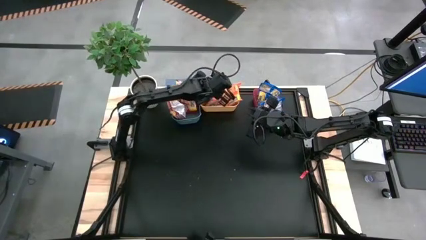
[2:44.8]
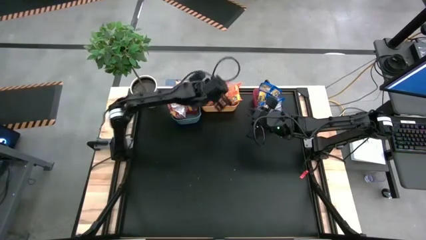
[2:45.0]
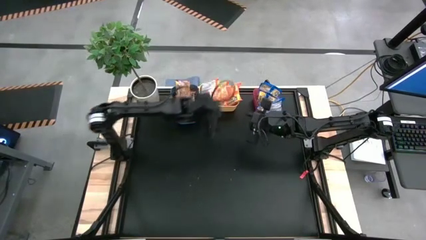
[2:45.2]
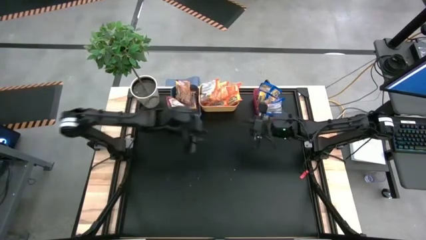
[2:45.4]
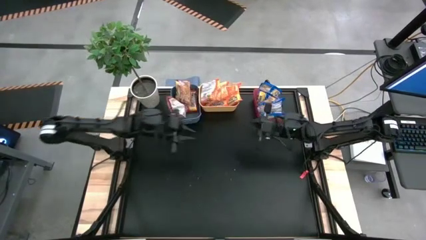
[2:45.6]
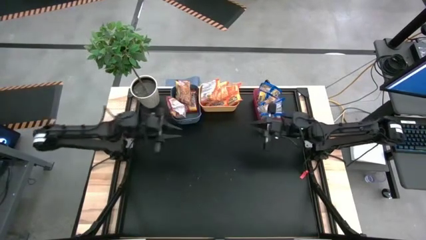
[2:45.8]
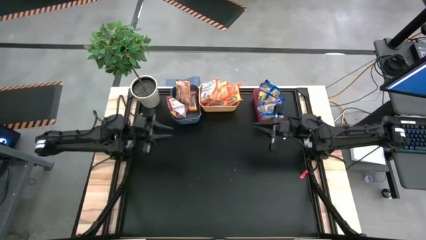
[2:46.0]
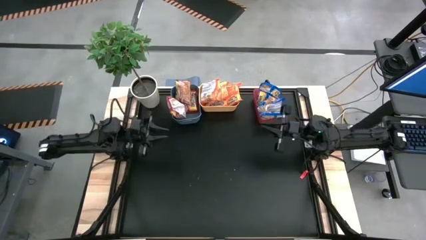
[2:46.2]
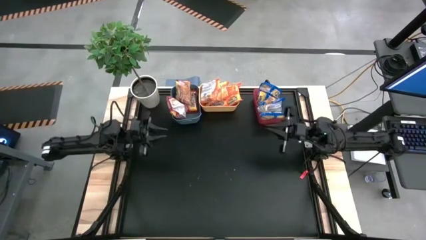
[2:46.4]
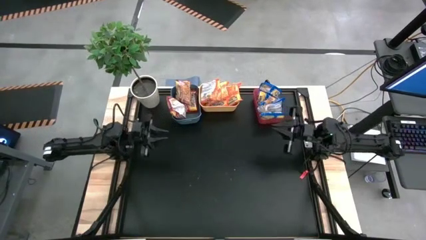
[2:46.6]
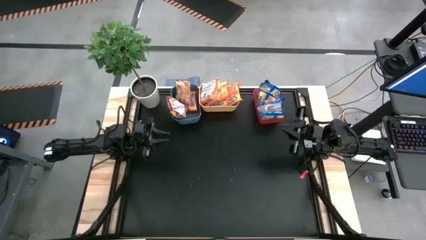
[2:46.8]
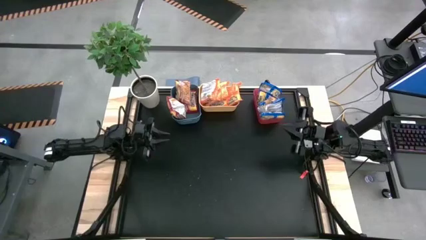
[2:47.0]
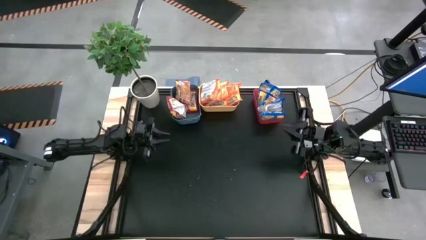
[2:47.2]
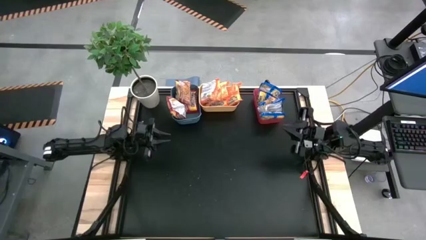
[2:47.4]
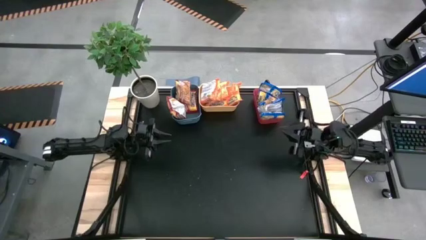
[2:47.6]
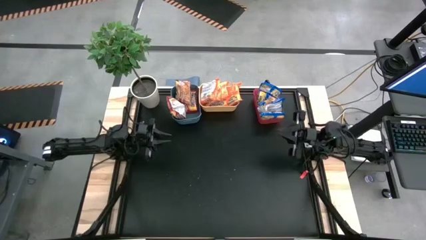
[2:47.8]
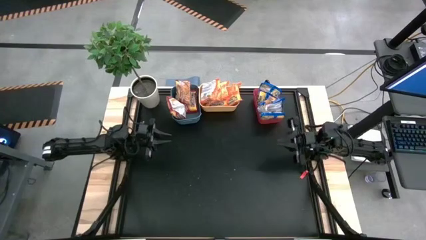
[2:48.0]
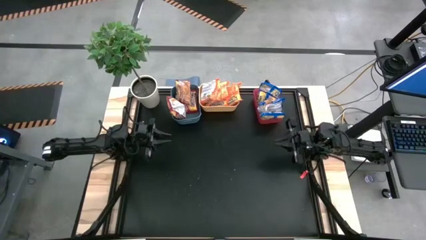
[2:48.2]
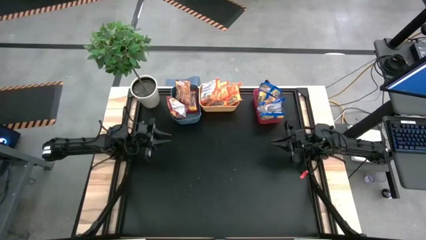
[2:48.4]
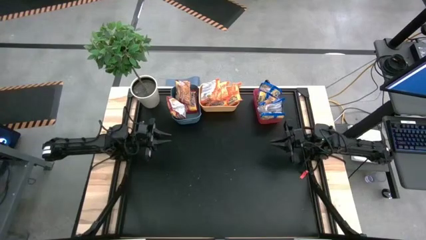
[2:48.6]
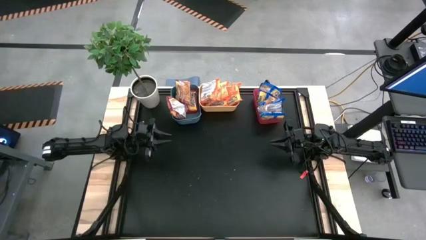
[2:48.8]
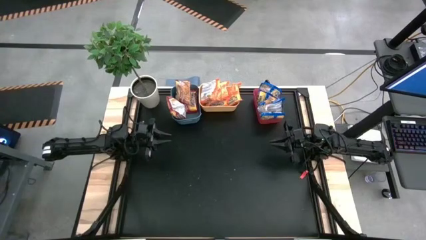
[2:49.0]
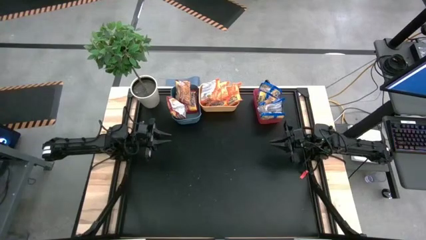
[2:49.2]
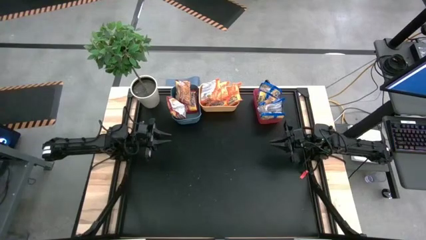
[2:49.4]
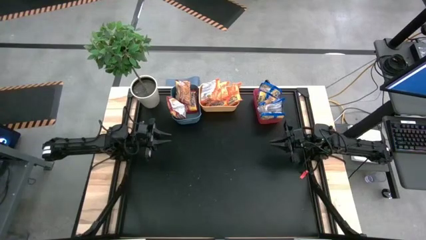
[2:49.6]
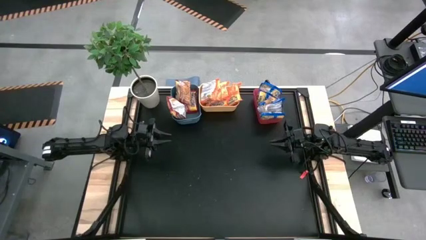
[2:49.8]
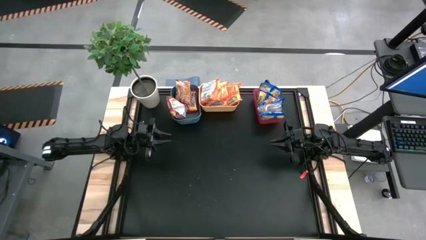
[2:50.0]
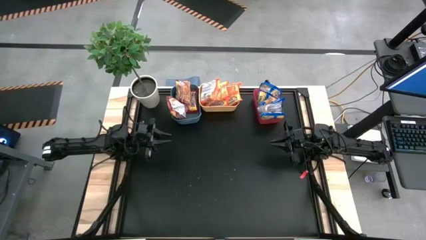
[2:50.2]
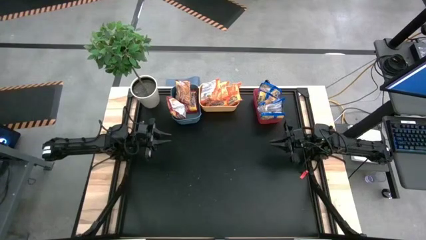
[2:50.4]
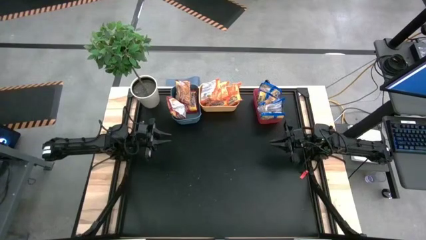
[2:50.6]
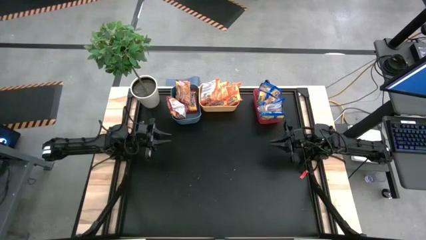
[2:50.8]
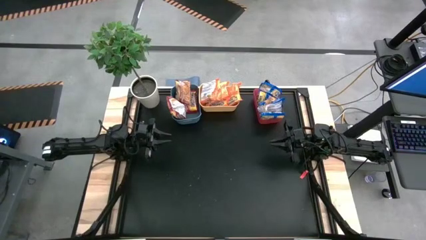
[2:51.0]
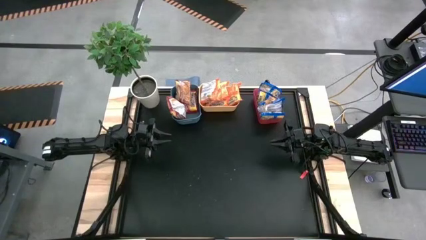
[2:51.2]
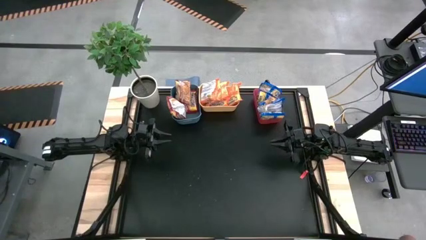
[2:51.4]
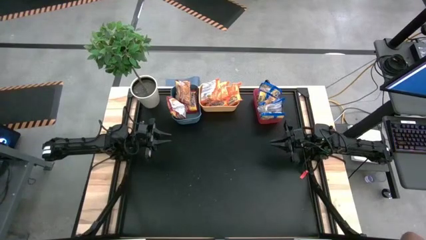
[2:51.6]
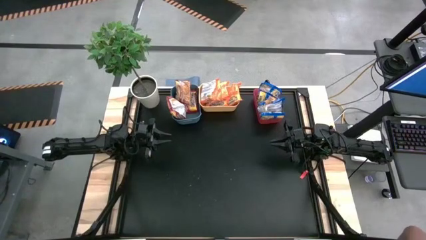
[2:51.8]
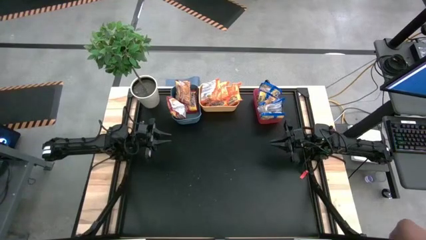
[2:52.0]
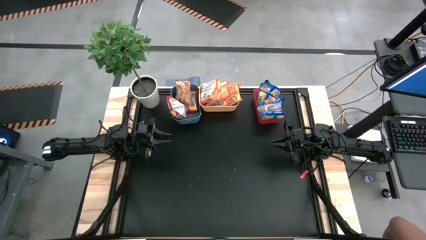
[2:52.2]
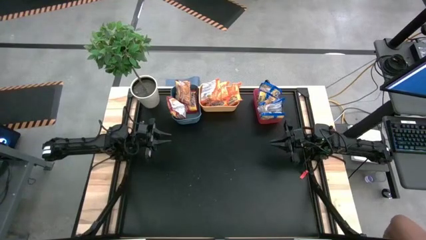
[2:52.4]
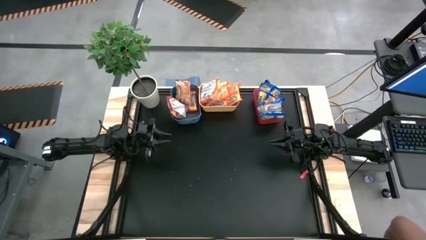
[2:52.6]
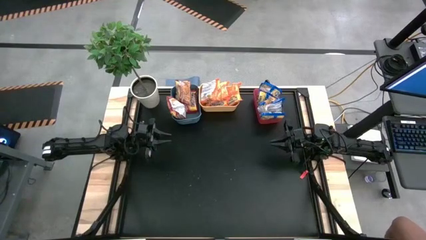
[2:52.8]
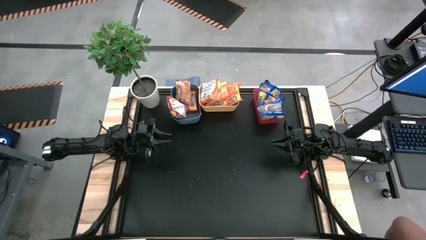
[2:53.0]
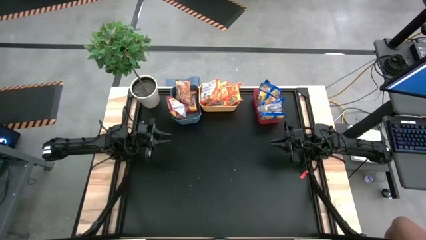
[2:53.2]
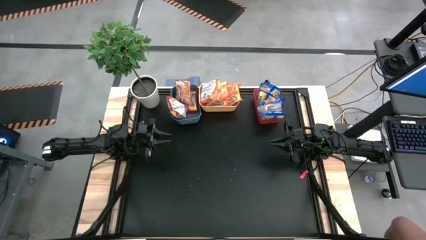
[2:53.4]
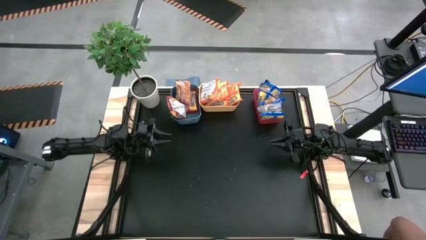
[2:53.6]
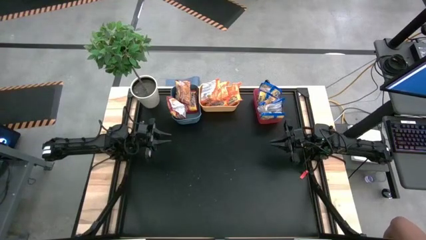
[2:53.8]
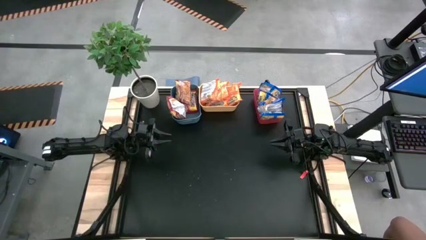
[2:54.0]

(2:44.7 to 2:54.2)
Task: Sort Maruchan noodles
Return to Home Position

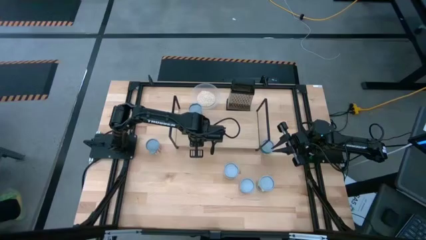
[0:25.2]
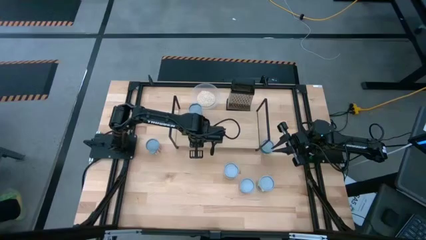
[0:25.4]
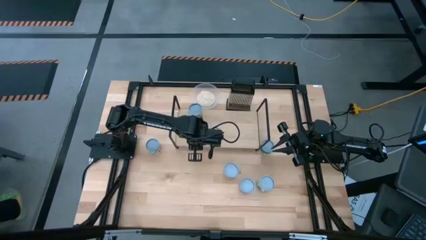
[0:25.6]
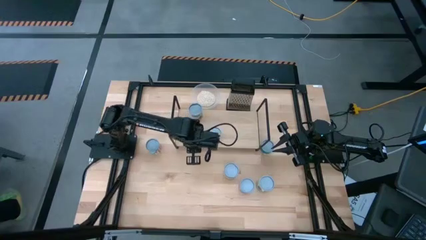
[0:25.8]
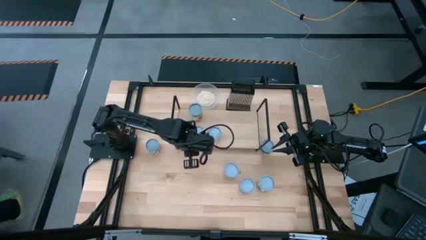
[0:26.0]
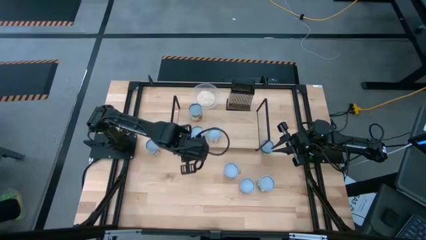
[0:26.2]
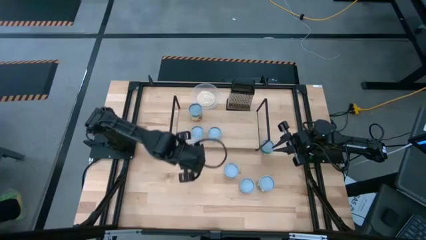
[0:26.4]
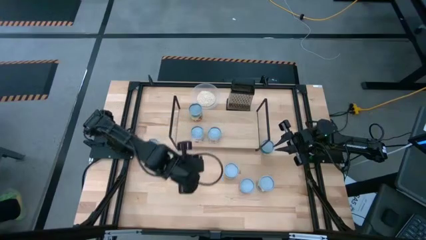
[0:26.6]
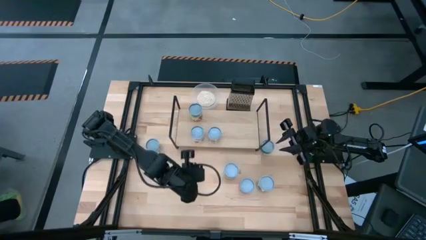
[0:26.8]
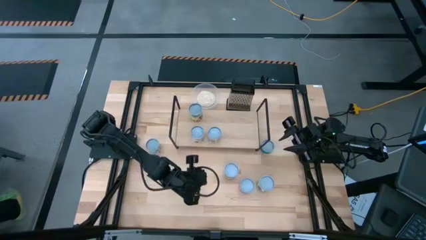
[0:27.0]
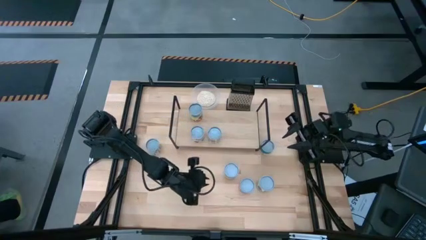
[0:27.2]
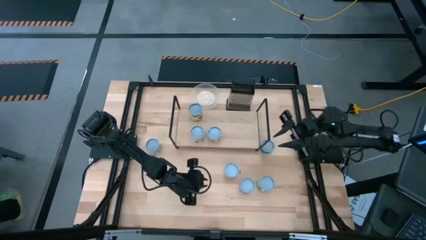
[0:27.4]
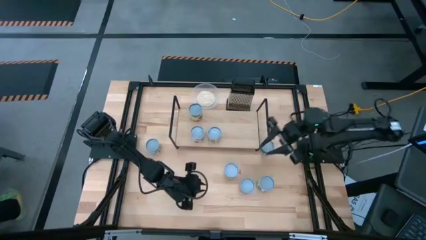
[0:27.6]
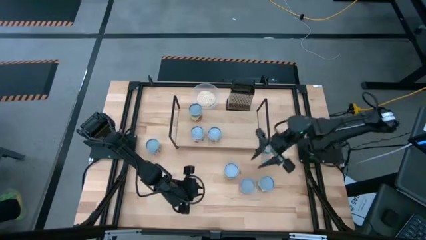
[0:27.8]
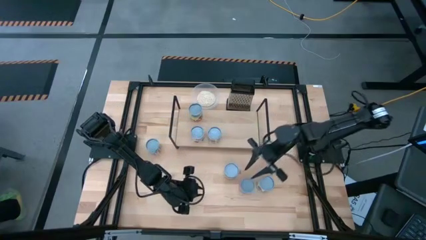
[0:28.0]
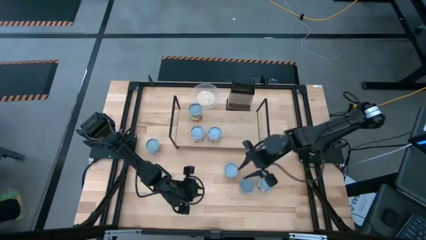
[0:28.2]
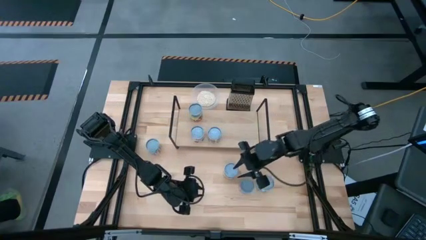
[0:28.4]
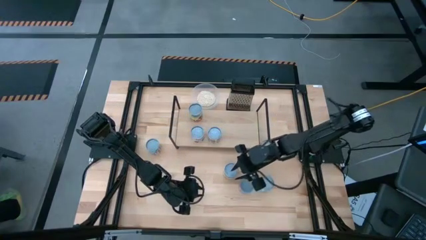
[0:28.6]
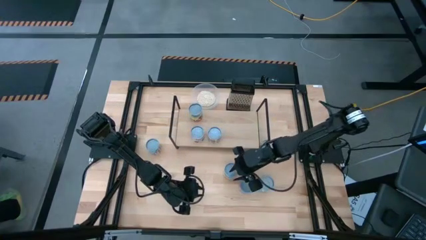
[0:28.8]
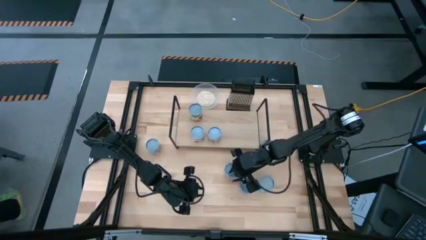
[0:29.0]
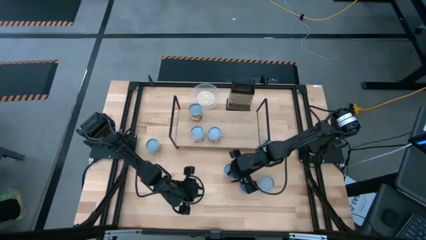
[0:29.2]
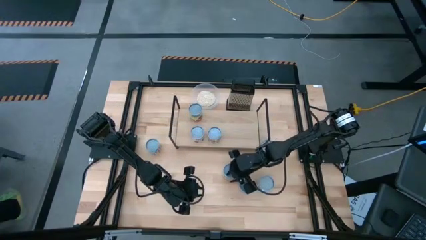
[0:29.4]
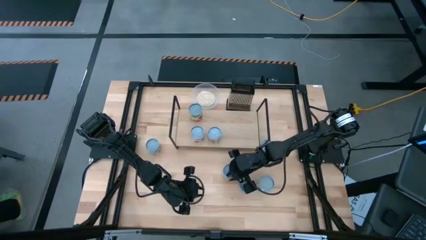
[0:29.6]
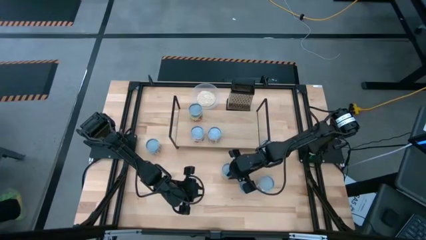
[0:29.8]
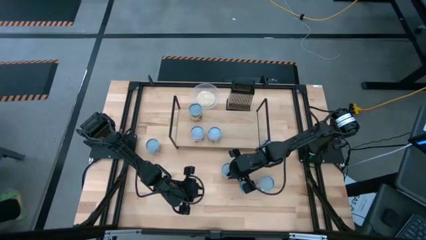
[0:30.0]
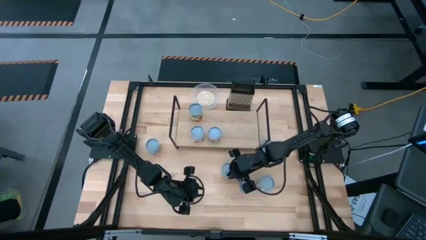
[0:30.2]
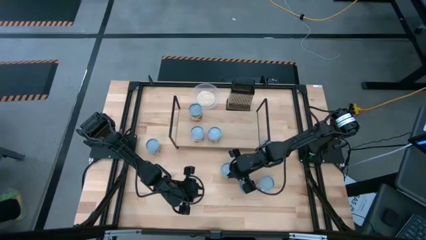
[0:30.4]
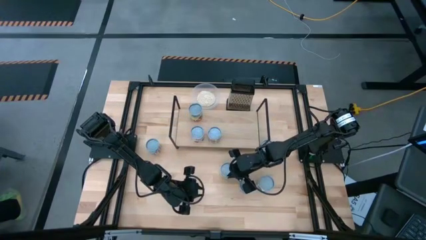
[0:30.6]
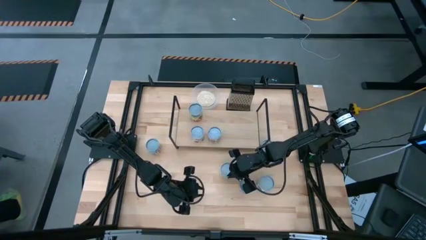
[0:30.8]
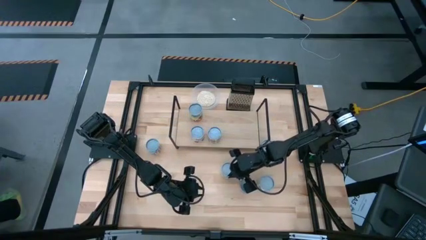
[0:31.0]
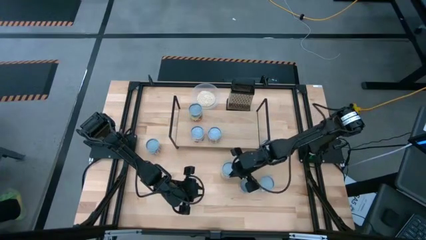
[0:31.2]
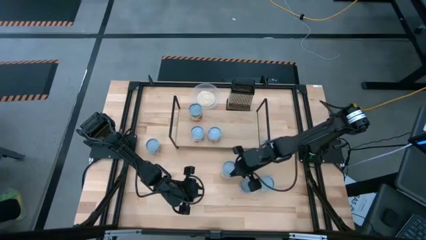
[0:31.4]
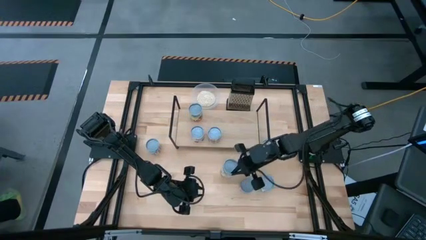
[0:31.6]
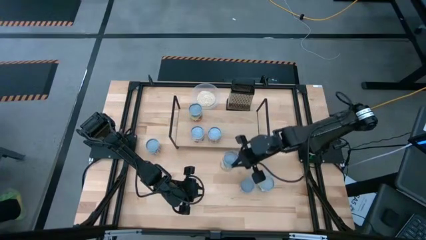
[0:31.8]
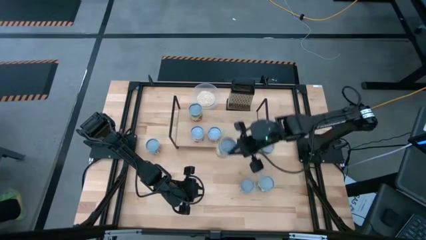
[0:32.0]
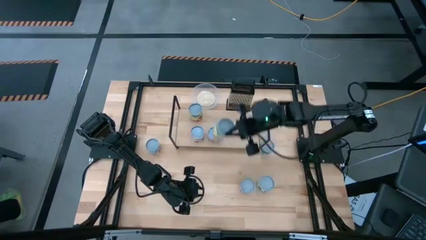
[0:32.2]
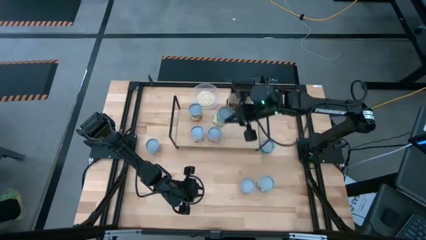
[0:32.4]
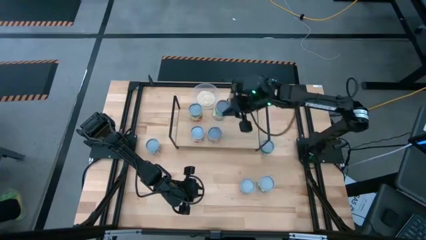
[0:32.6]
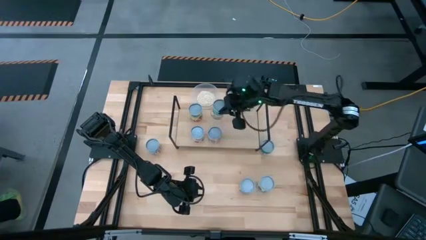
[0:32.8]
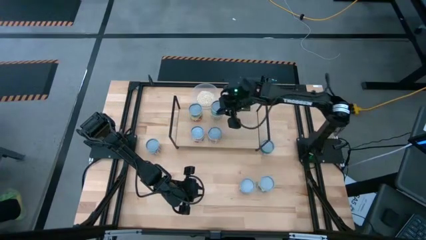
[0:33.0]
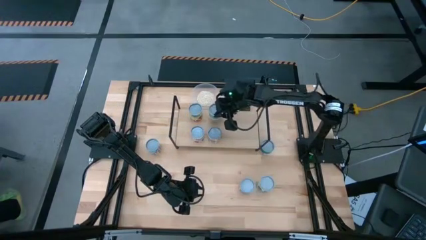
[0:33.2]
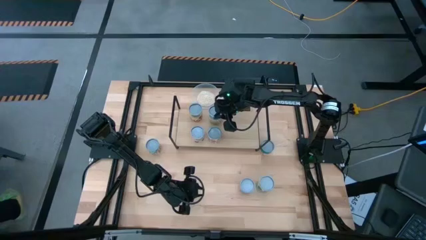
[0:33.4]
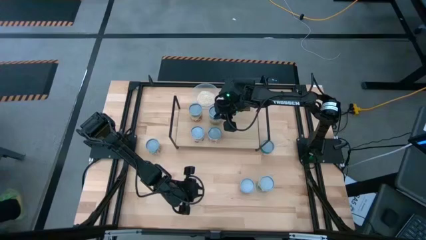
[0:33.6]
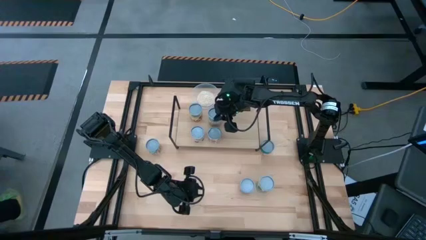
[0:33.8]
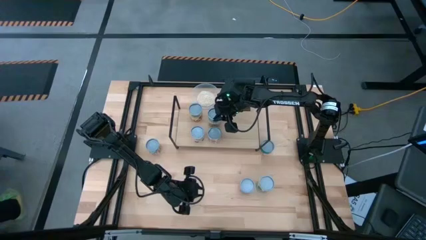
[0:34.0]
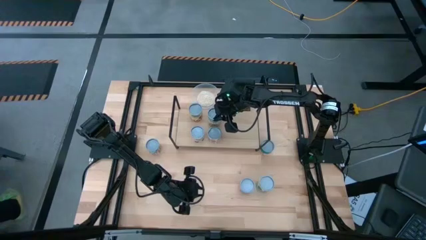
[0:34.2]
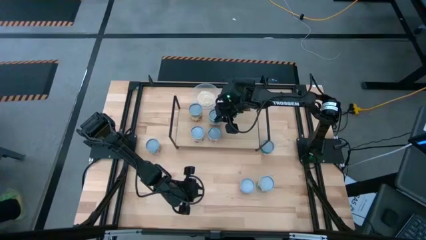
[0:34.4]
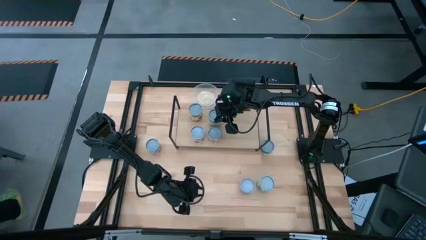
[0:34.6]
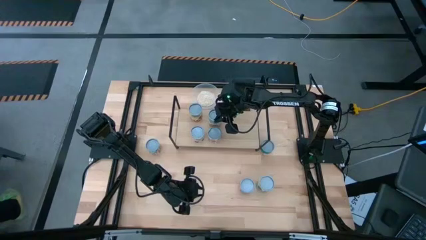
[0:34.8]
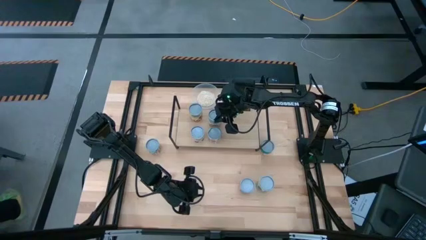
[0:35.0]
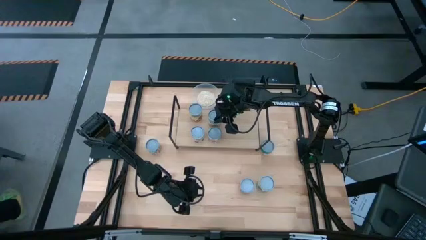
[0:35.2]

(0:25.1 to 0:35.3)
Task: Pick and place cans onto a shelf
Put the canned chicken soup on the shelf
